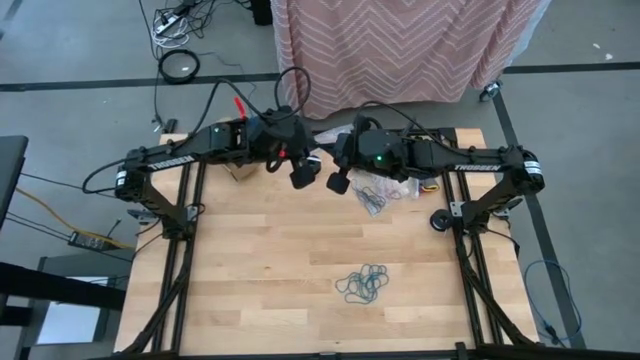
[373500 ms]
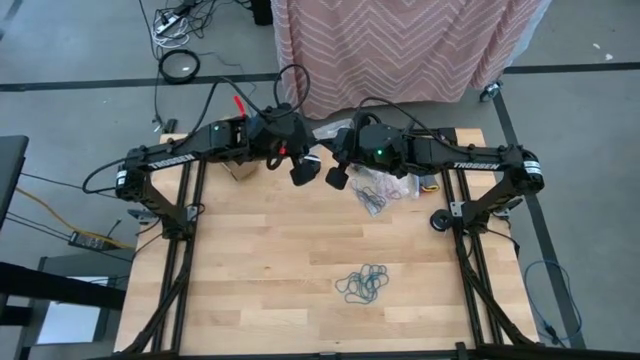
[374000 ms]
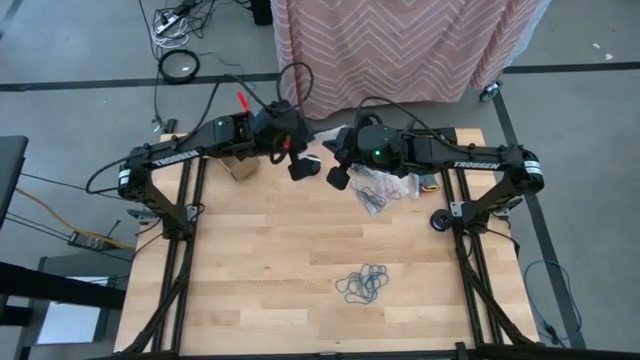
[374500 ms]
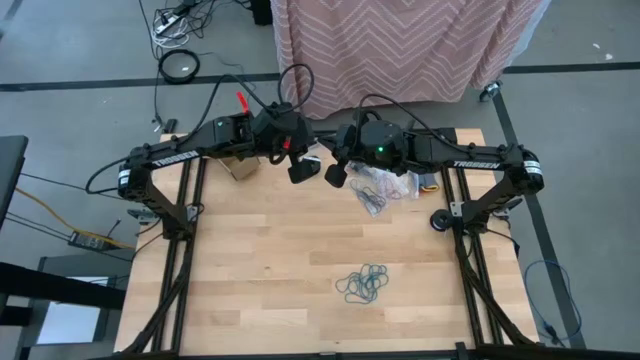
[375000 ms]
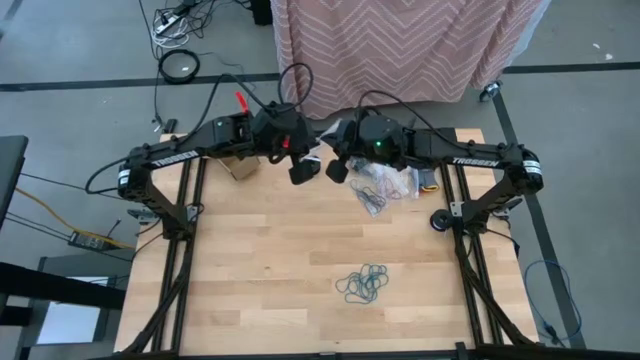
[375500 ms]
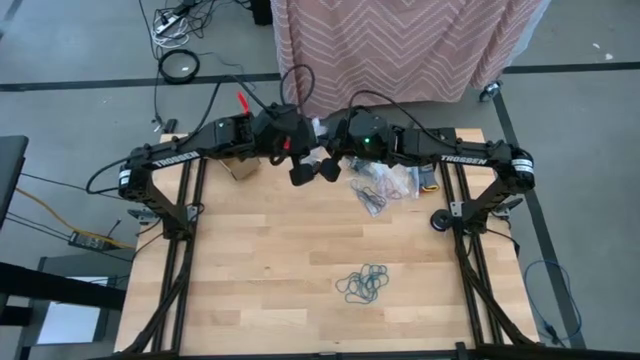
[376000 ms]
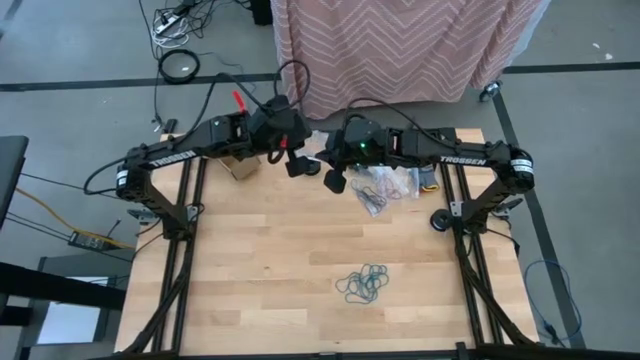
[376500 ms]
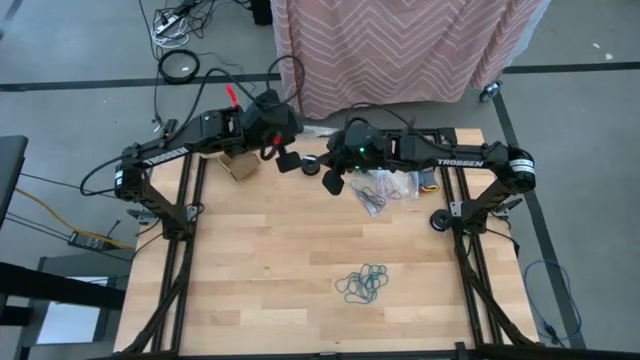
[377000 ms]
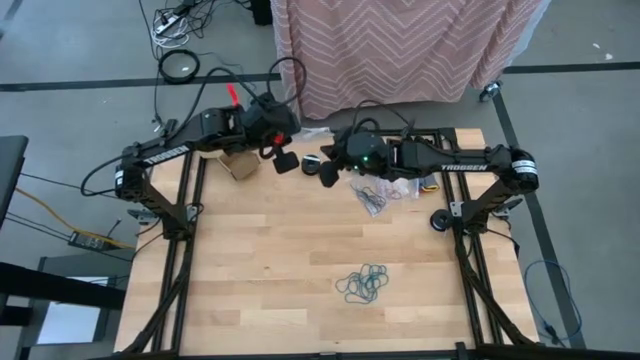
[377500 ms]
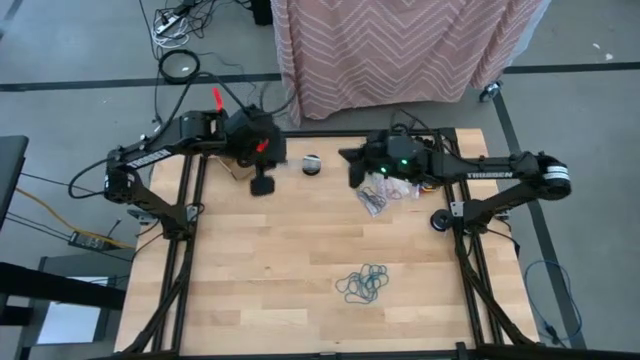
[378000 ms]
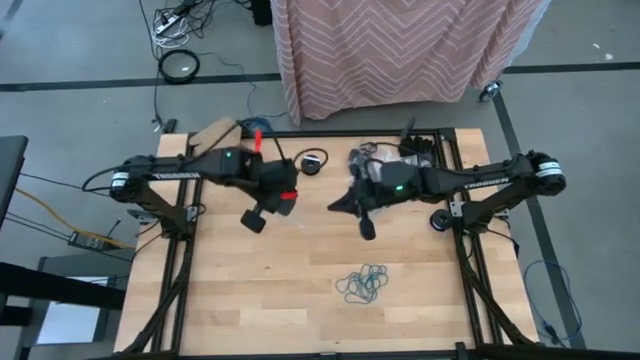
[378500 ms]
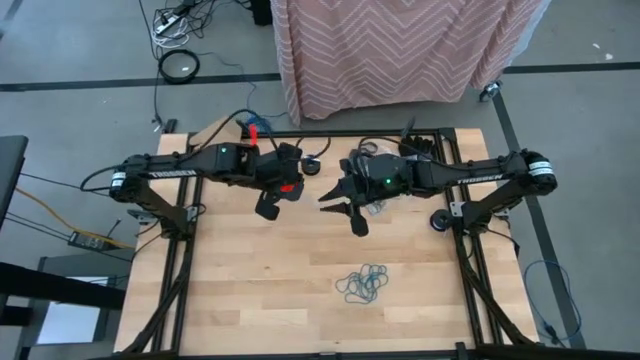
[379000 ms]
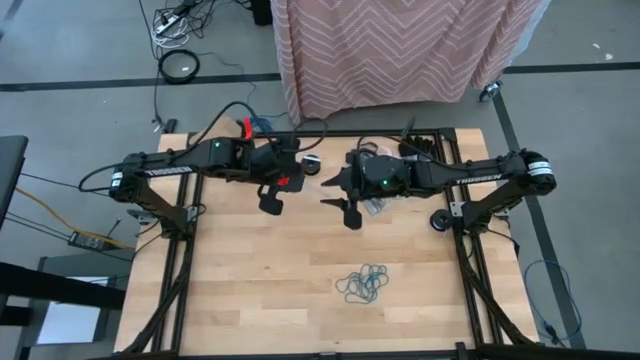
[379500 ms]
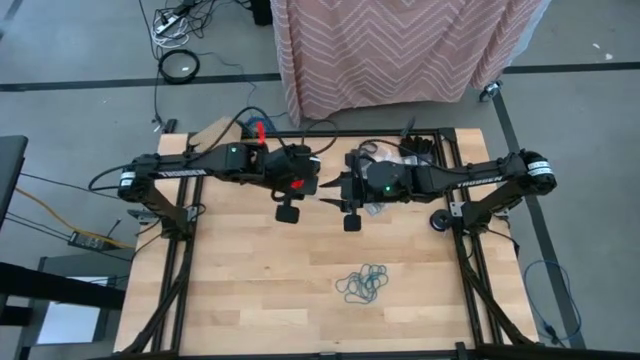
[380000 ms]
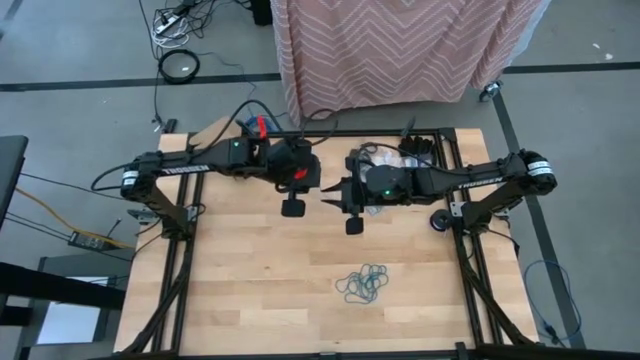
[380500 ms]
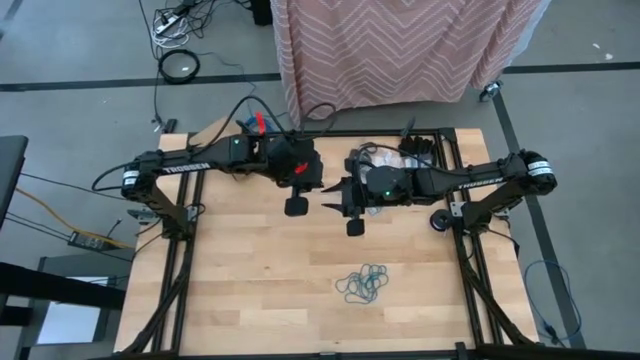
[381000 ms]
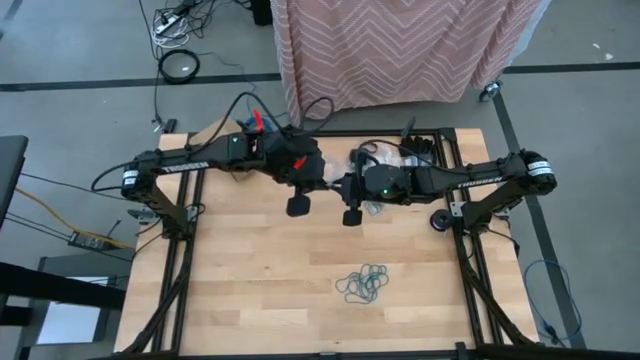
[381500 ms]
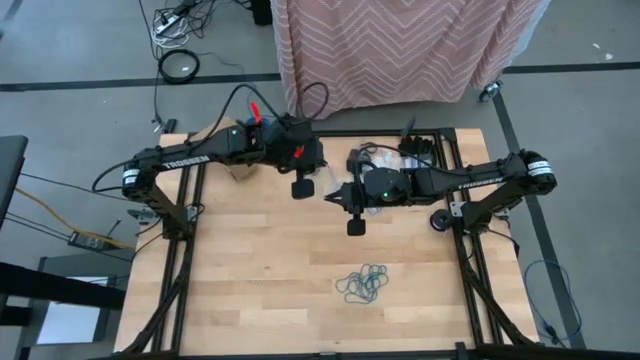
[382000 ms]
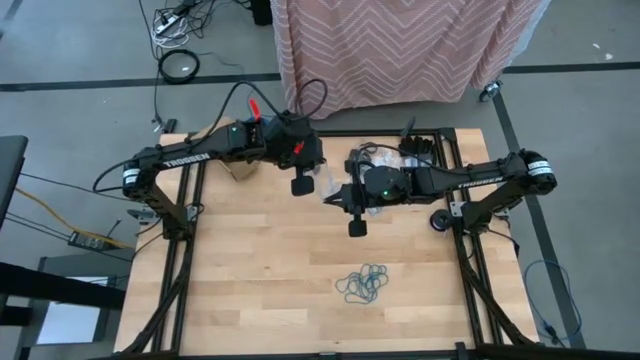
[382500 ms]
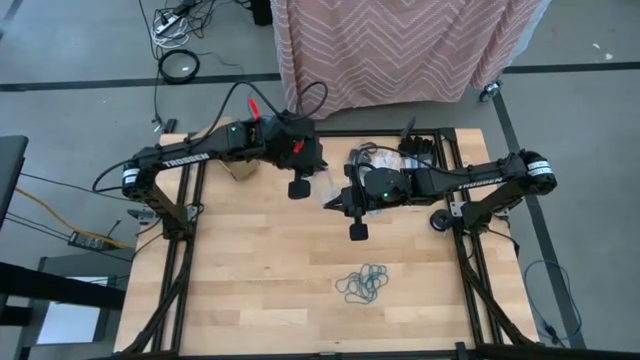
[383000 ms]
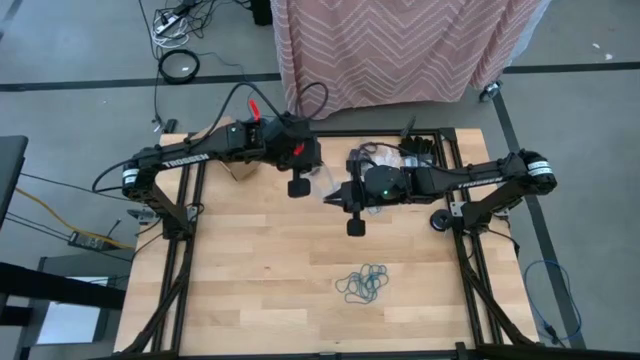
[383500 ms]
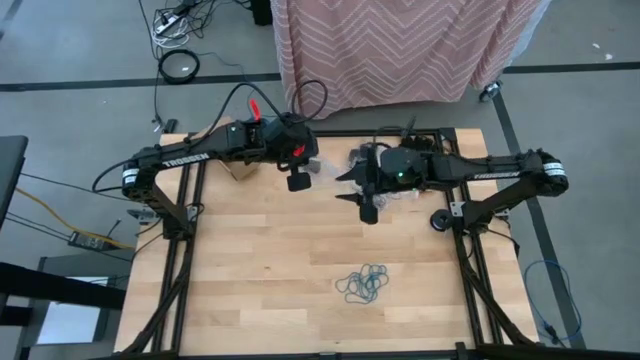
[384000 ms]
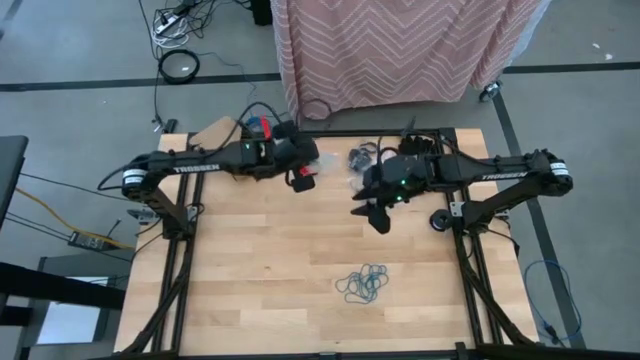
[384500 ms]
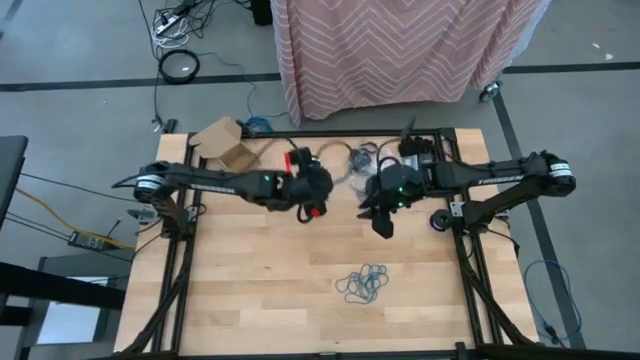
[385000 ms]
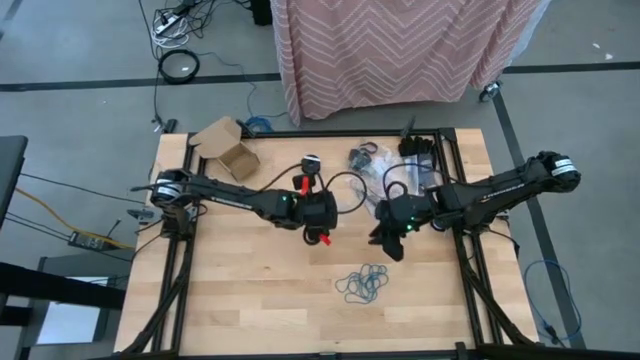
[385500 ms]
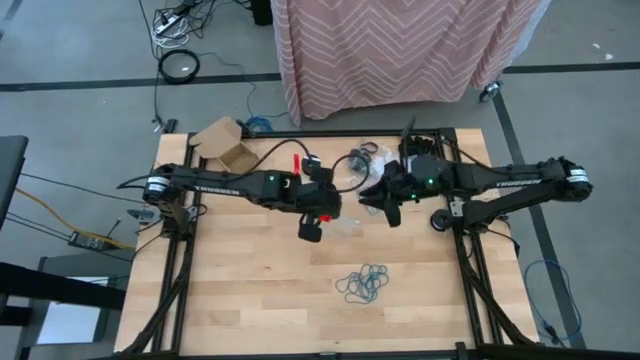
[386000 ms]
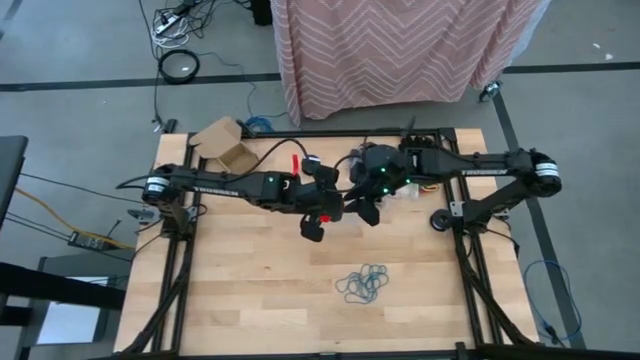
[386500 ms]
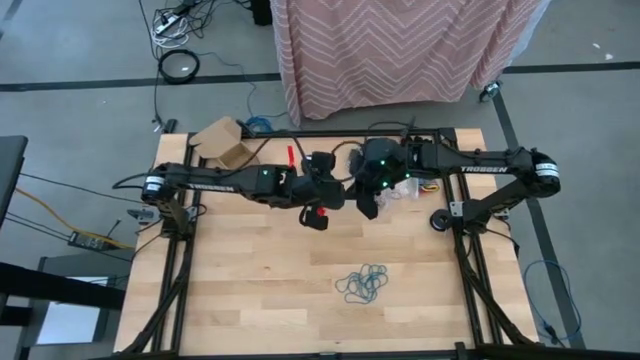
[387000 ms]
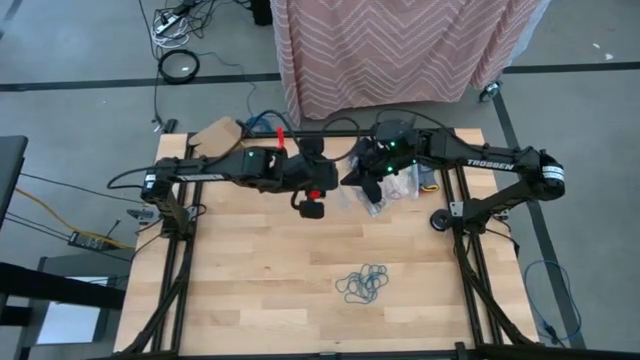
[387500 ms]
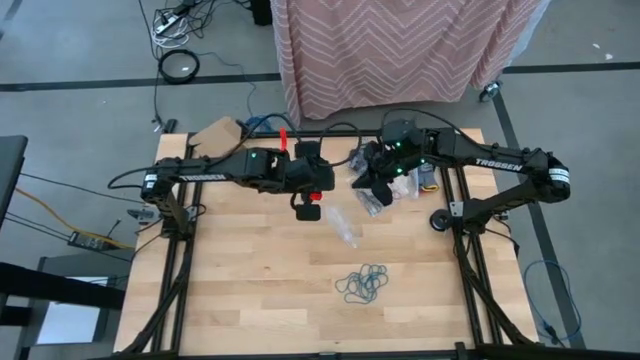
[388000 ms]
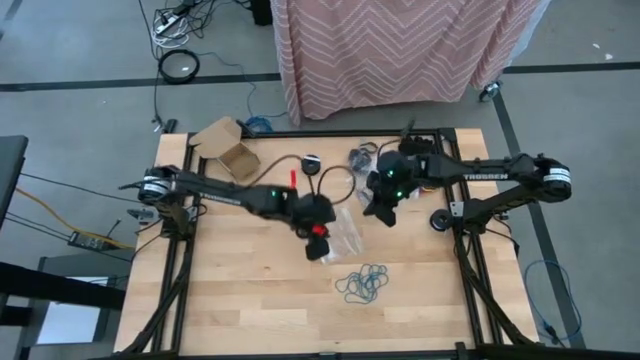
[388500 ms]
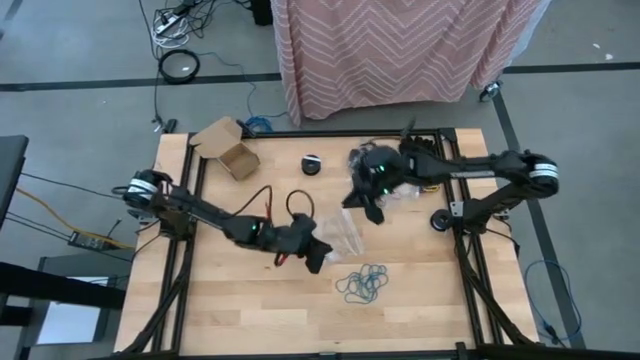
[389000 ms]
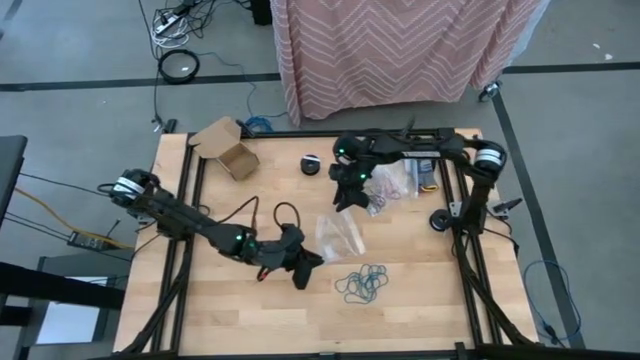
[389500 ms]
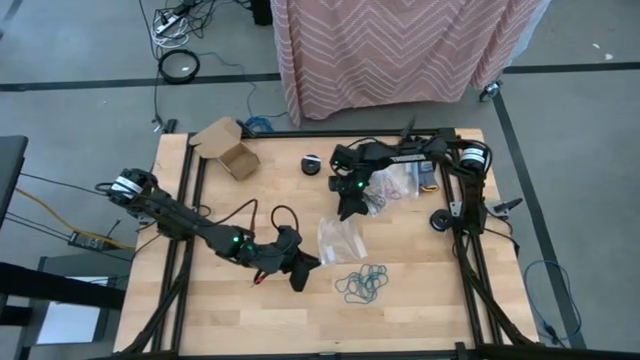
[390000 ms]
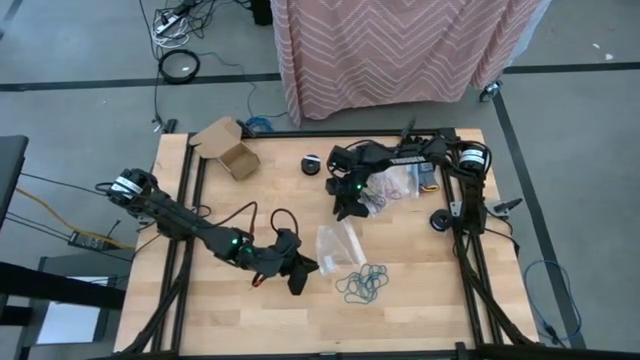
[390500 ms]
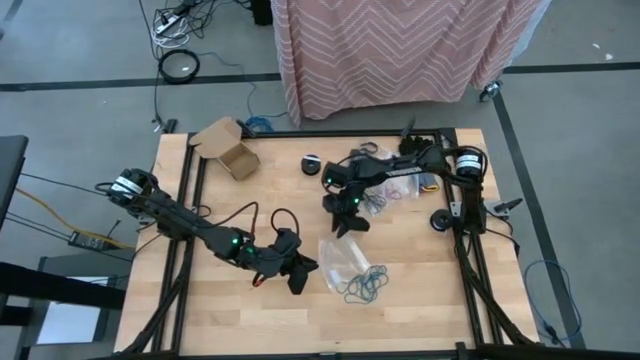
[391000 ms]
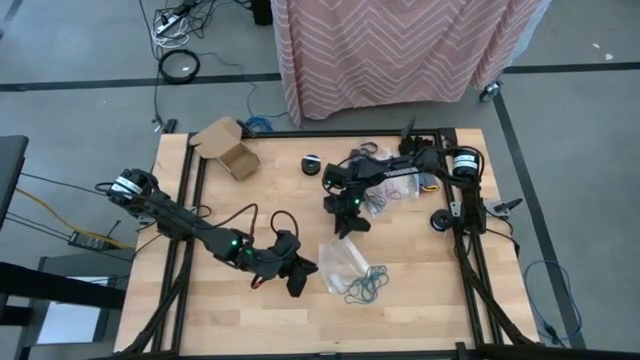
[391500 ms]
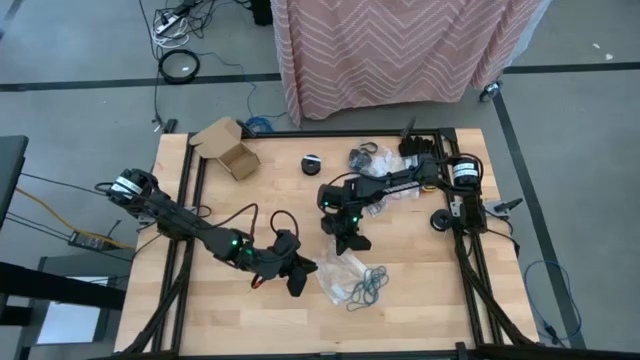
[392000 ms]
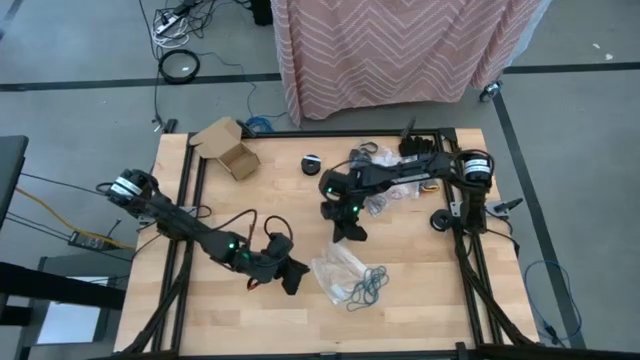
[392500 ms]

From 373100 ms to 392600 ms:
Task: Sort rubber bands
Open the transparent zip bag

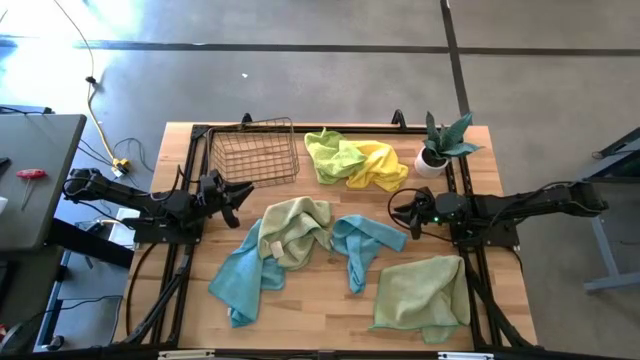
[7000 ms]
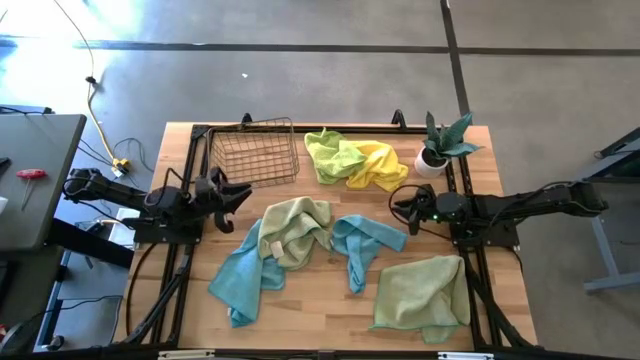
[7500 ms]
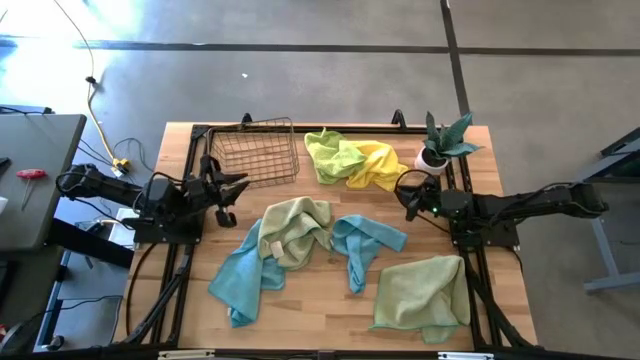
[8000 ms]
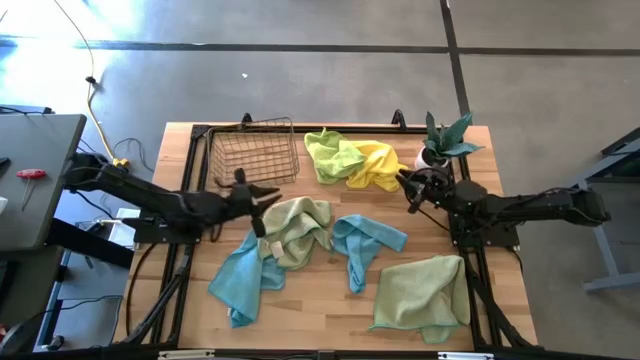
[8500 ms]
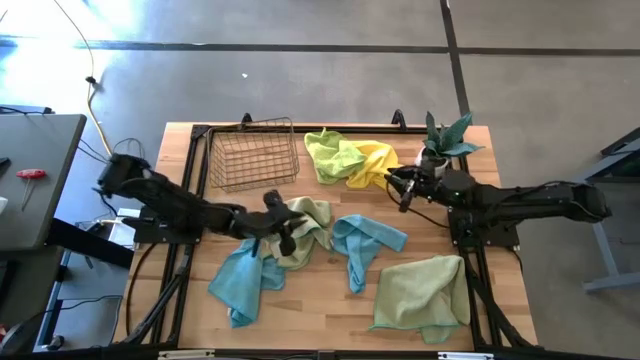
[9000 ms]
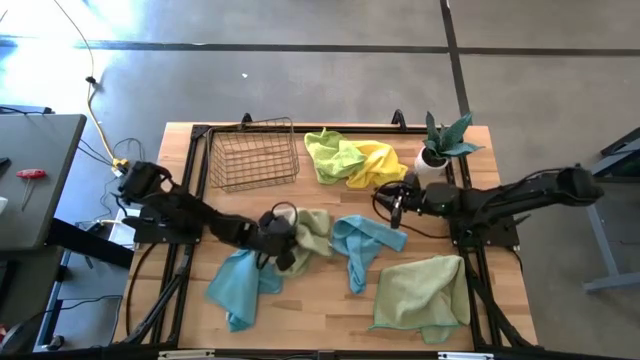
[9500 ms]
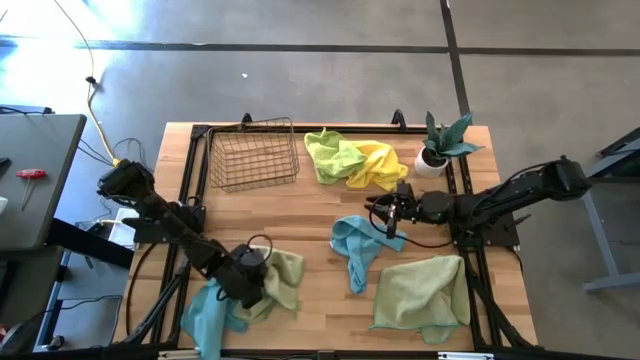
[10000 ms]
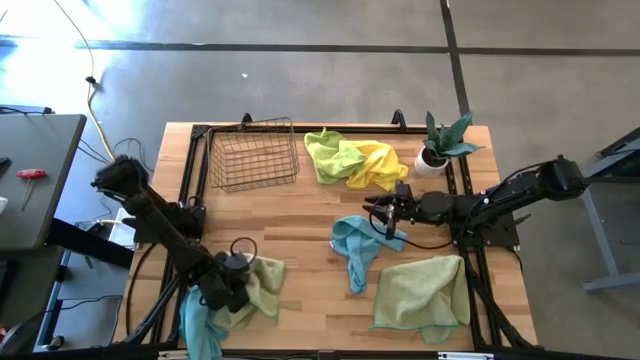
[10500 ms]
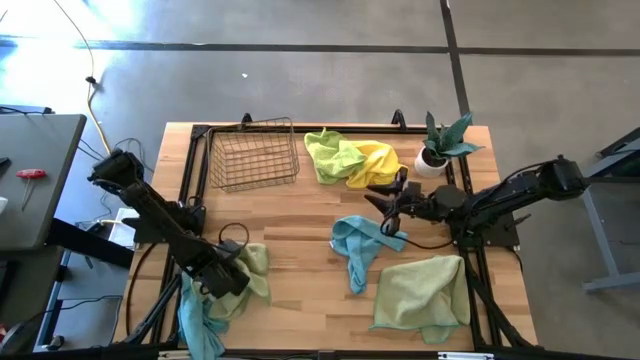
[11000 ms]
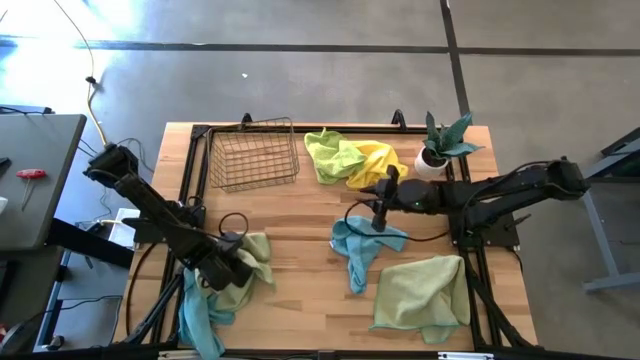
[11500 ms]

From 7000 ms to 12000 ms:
Task: Fold microfiber towels
Move the stacked towels from the center to the left side on the table
